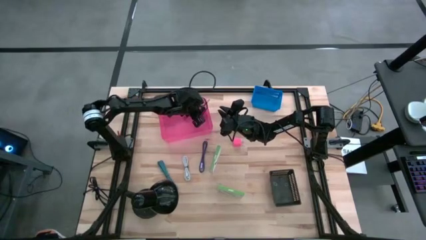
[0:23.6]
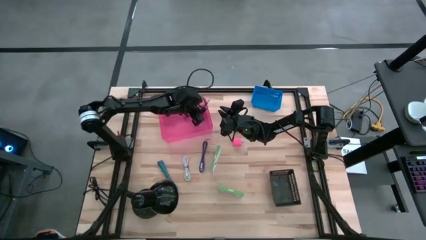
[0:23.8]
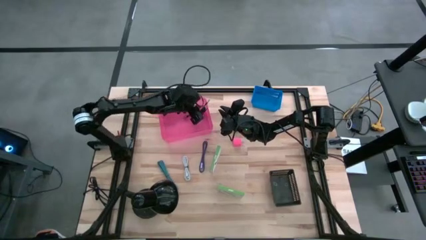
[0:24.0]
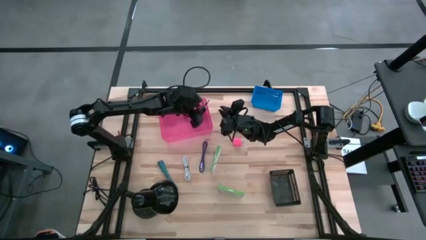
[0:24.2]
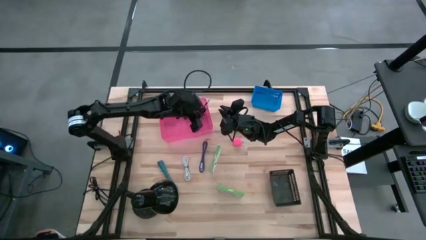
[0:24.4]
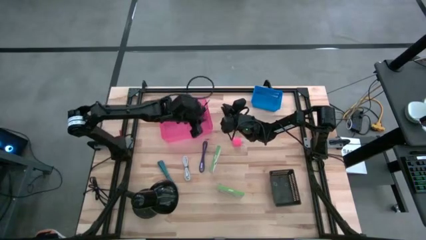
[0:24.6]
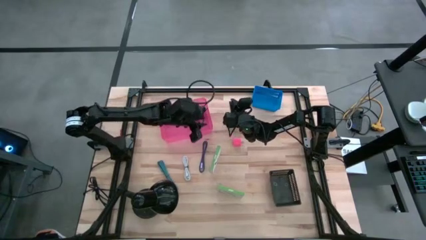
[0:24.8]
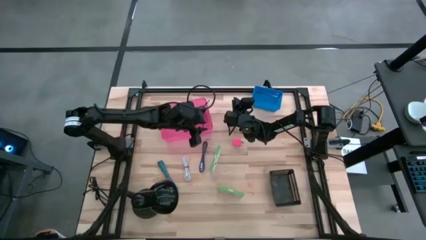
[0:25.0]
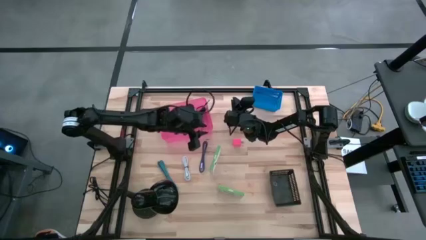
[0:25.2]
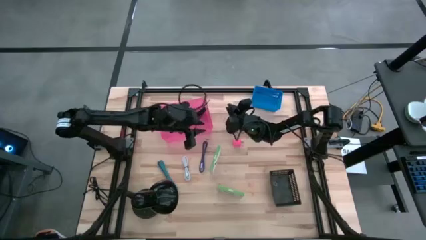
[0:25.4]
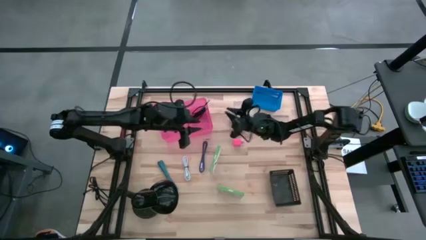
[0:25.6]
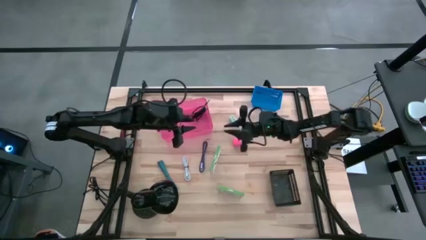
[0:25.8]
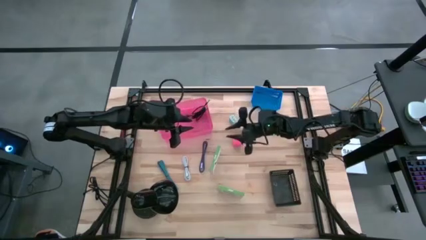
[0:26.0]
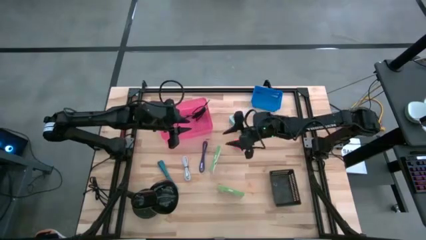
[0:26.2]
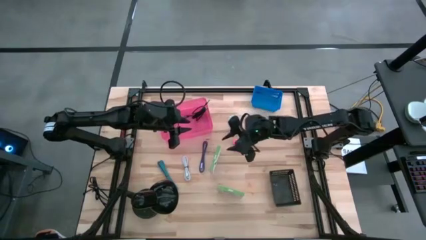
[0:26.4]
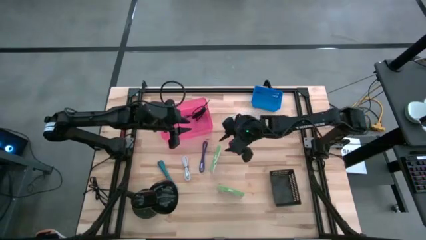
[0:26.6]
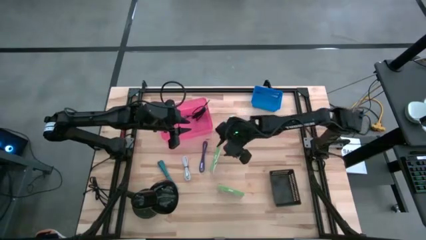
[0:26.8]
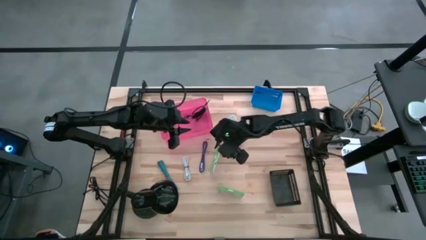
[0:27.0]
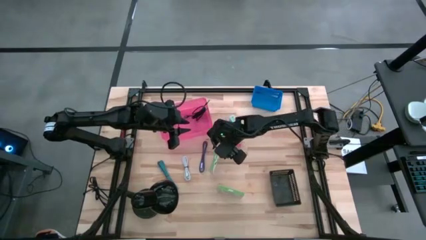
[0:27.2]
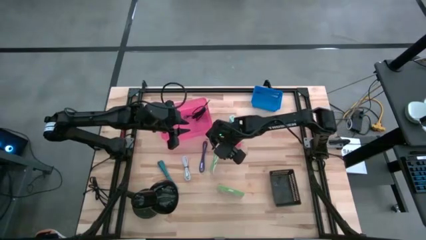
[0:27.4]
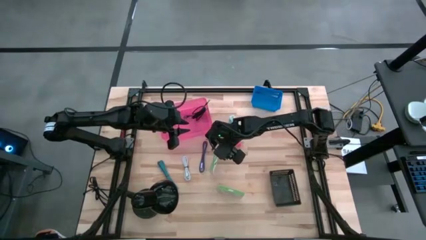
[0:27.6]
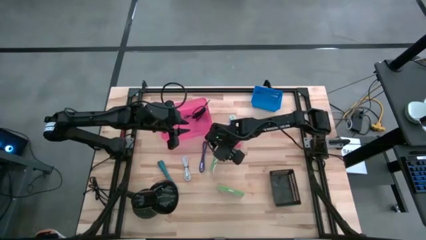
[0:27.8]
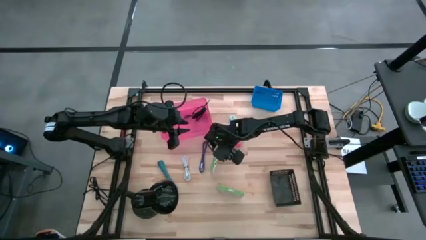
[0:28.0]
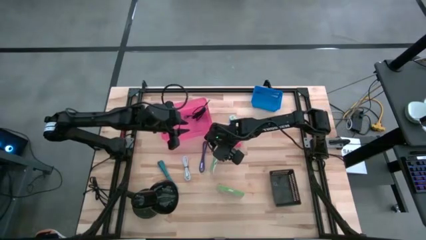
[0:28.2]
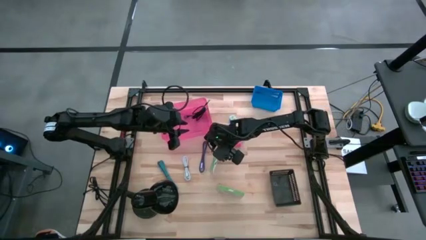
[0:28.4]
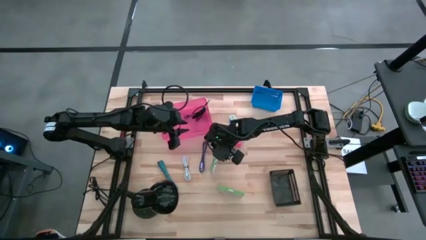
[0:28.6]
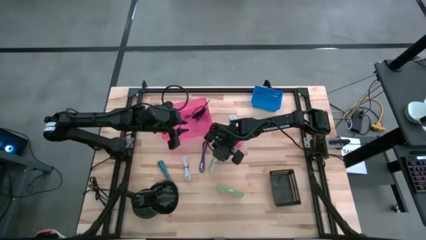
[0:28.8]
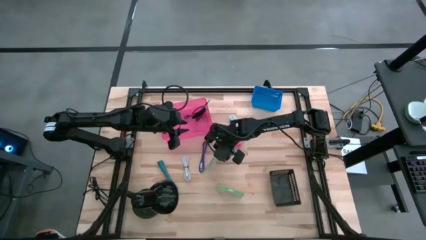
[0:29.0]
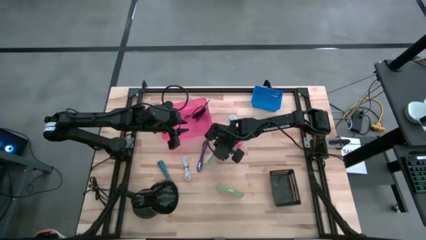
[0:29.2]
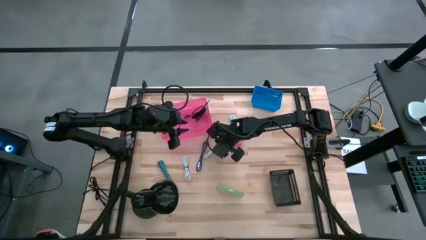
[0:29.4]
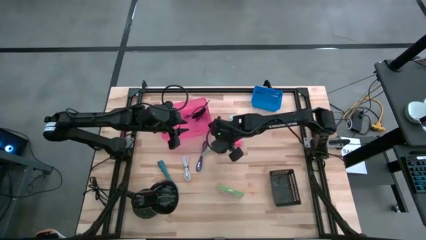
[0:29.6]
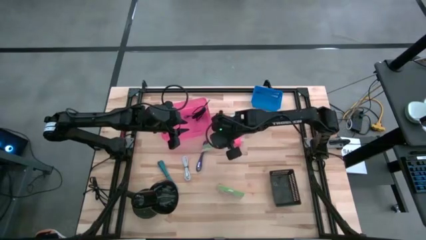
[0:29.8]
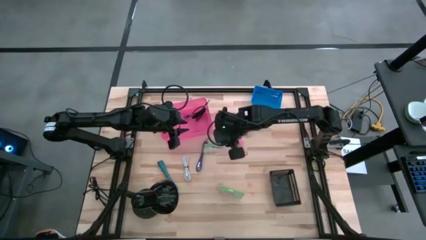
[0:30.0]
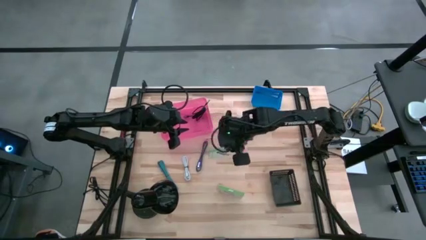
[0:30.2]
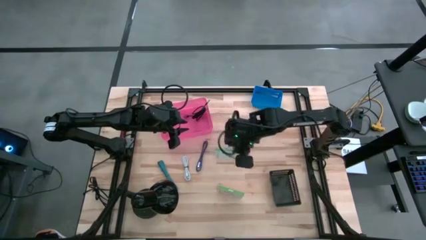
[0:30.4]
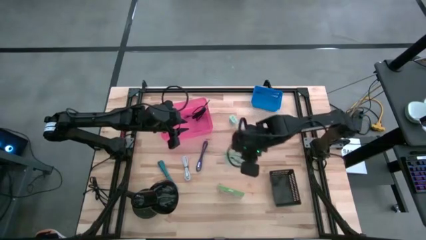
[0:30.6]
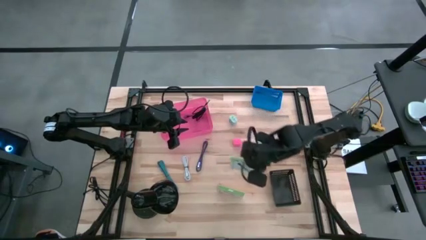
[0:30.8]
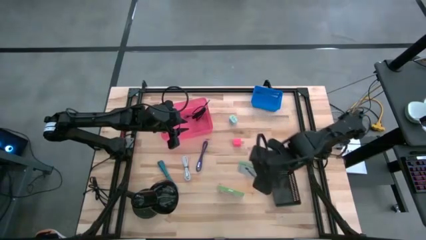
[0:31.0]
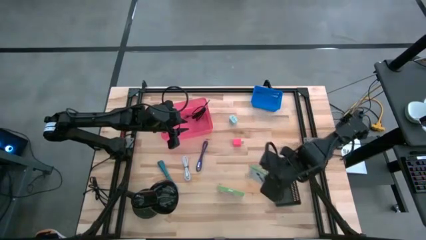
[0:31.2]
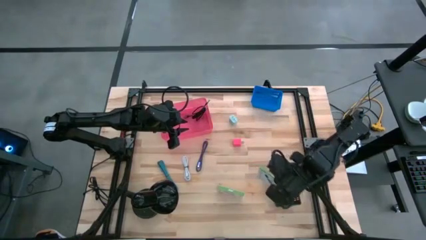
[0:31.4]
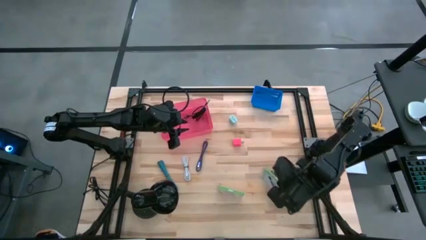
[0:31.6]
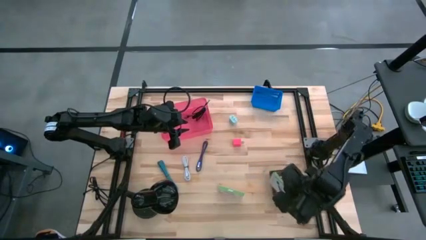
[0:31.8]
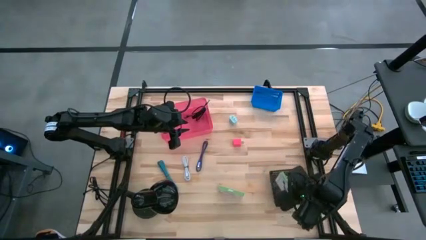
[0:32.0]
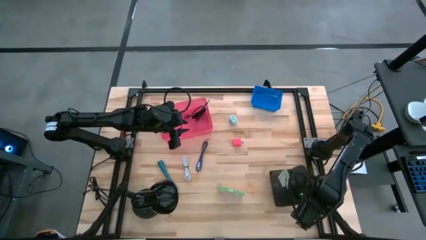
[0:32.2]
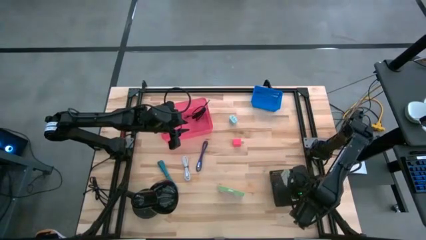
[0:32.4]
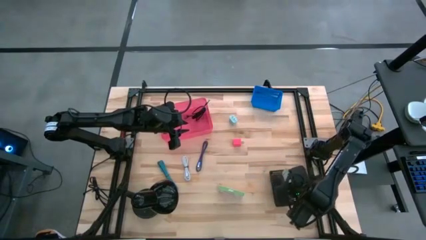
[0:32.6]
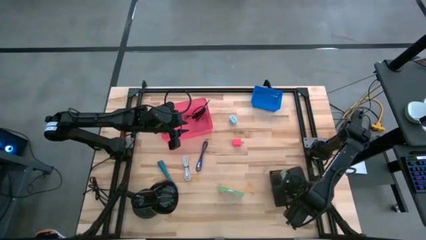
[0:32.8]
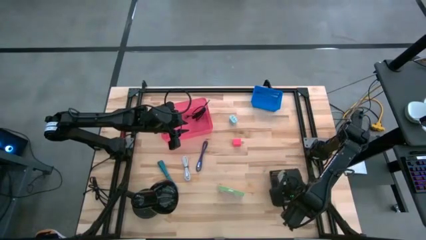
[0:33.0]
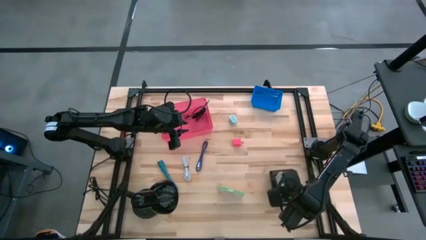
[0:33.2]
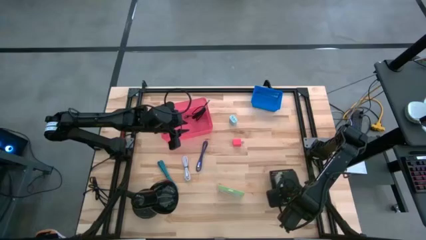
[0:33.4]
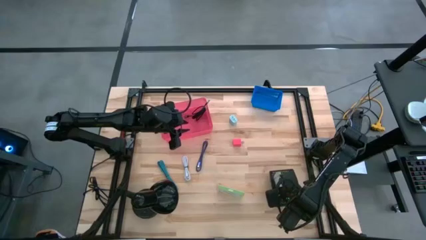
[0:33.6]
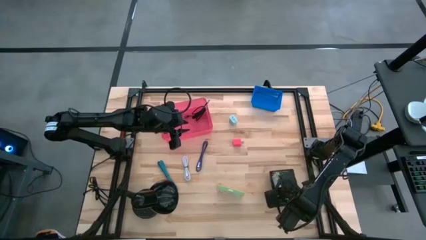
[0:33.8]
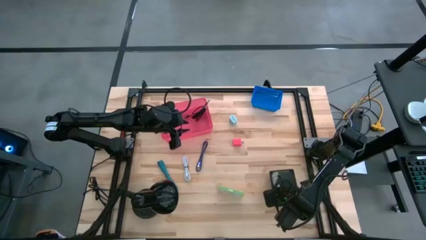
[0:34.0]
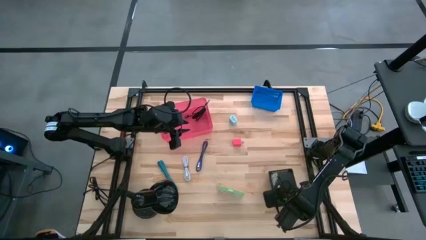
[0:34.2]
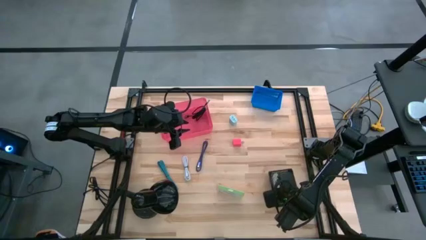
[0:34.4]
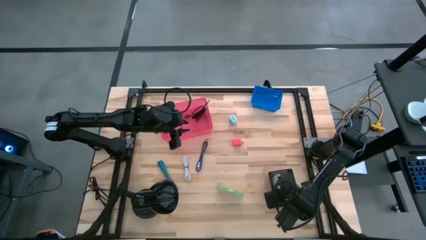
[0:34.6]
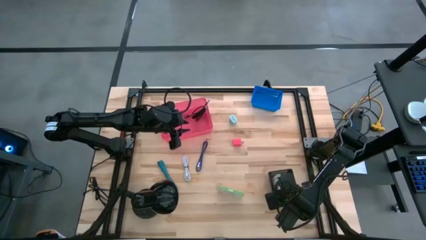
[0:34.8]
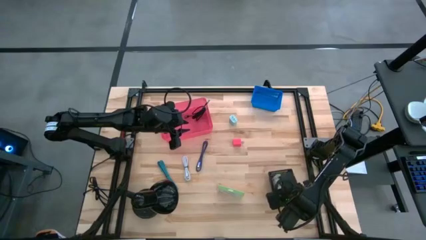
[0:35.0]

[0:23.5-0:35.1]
Task: Pick and place items into bin
Put the top usb box into the black bin

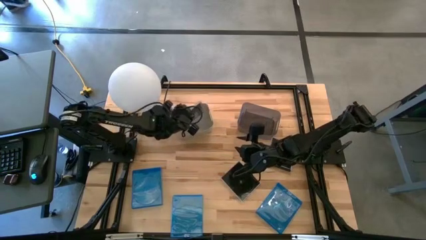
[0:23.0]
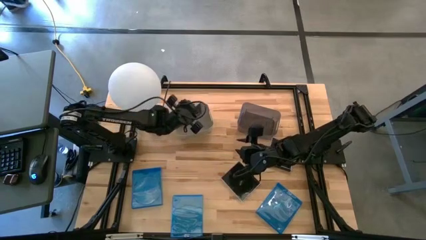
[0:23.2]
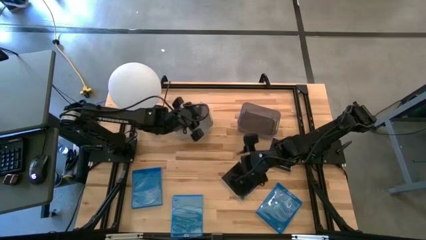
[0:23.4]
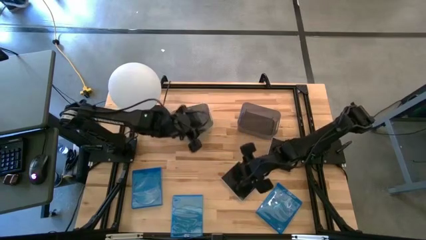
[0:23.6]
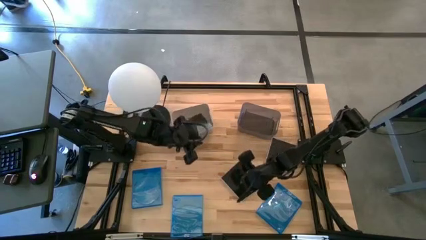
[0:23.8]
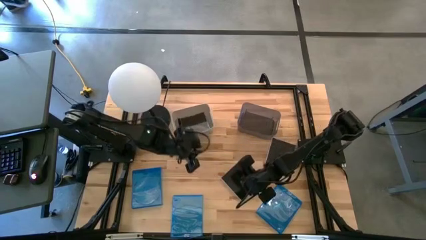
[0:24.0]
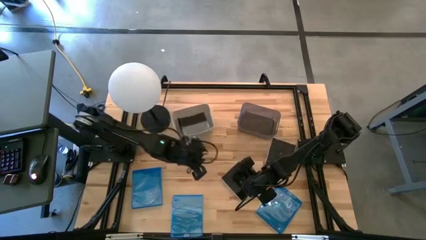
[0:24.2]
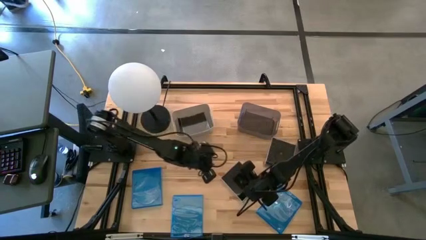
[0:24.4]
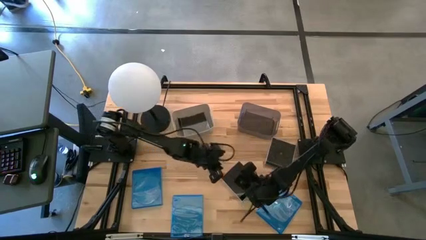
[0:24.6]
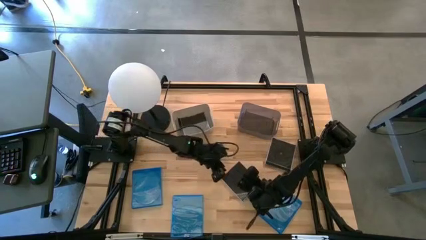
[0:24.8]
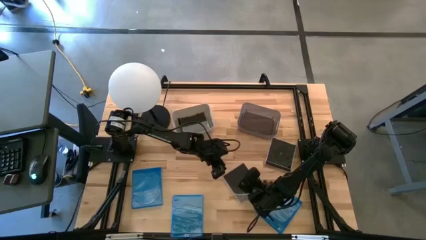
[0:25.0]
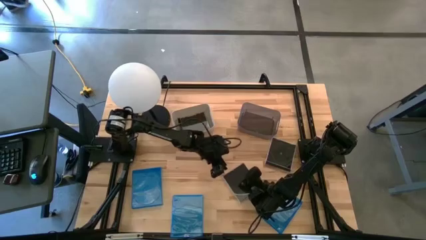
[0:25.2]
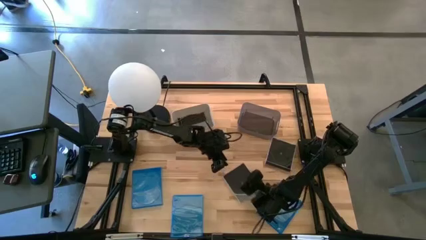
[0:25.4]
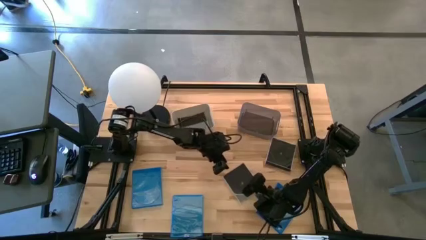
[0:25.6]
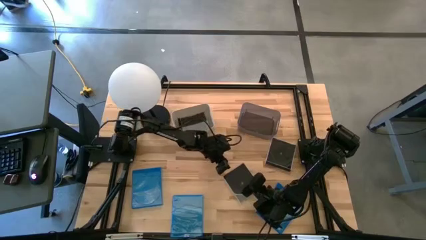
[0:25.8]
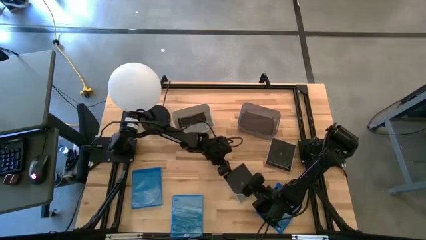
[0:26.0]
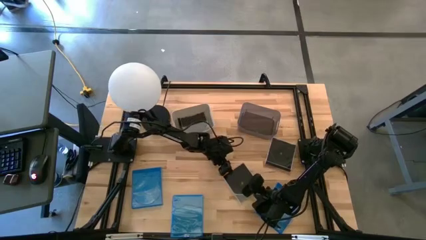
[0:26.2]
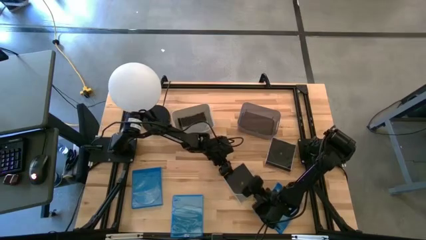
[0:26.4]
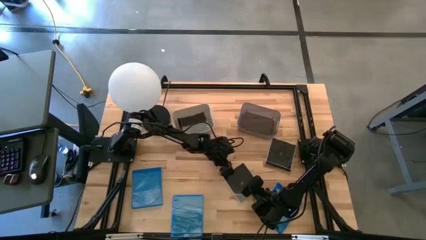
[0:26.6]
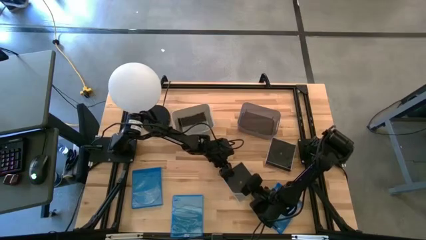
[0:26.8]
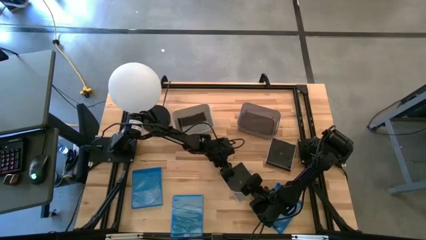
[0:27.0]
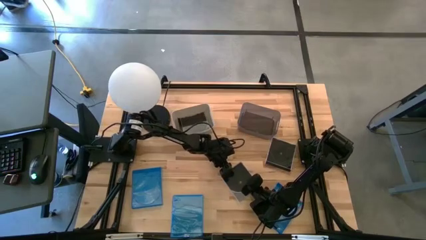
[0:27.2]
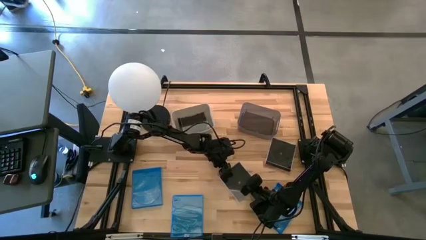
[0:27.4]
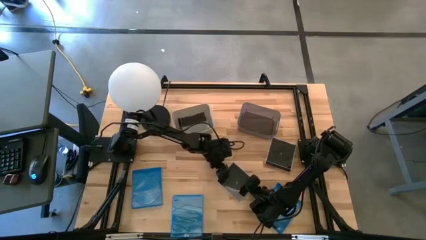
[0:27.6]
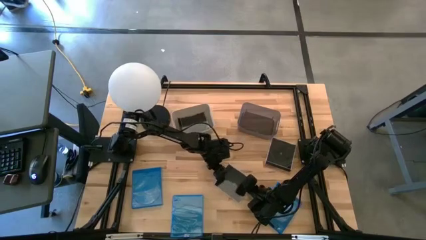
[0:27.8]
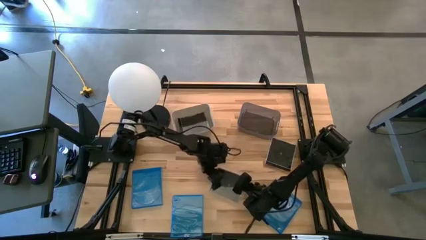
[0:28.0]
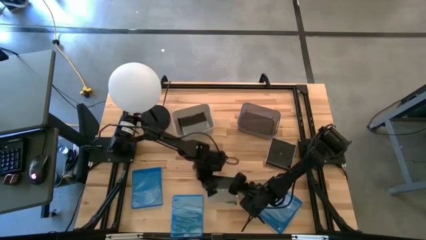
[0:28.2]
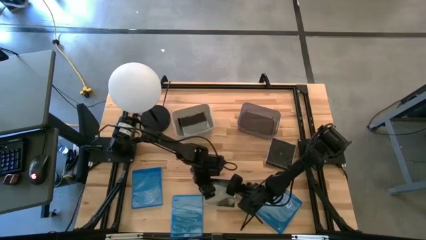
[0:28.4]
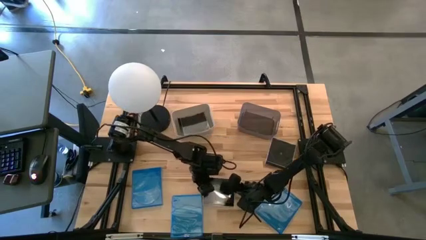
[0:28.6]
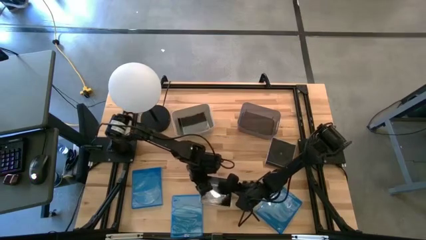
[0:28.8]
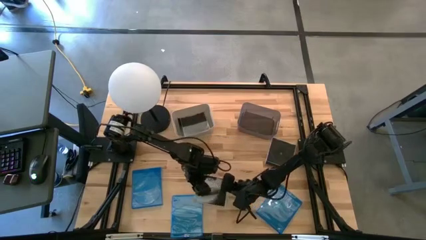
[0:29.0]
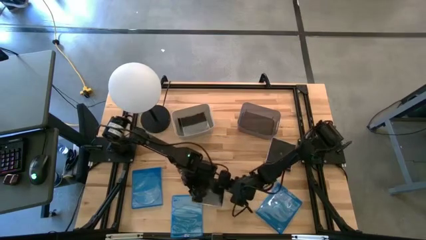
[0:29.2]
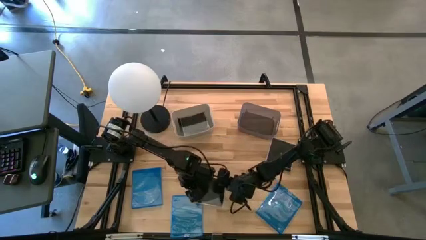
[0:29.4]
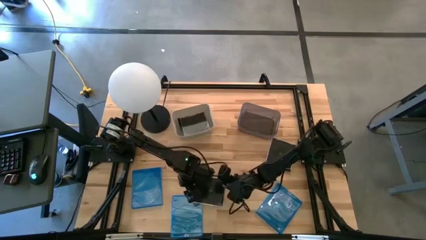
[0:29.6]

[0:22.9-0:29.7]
Task: Pick & place jewel cases by type
Put the bottom black CD case into the gray bin
